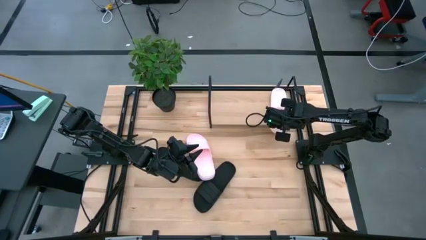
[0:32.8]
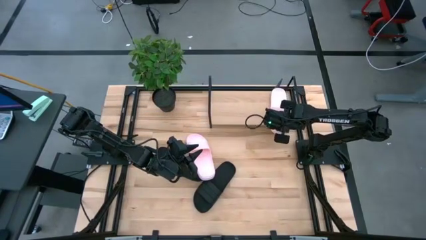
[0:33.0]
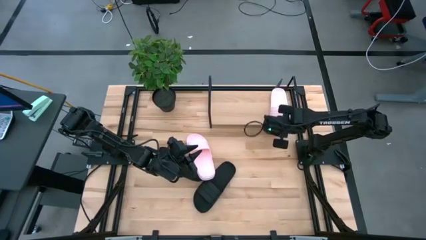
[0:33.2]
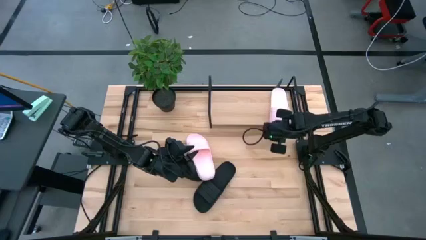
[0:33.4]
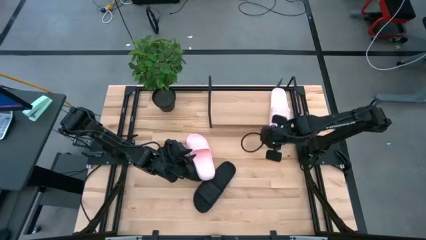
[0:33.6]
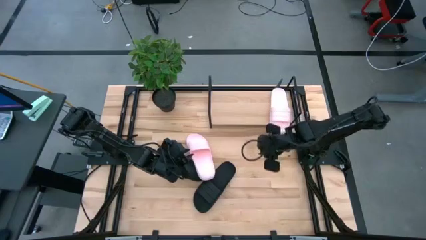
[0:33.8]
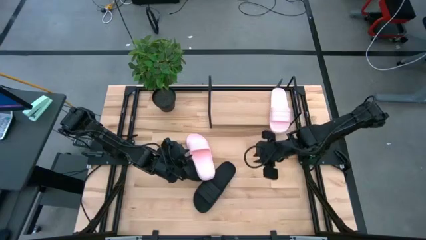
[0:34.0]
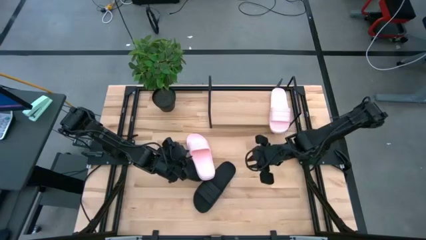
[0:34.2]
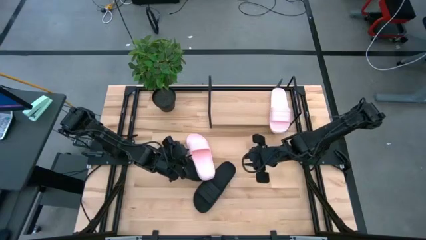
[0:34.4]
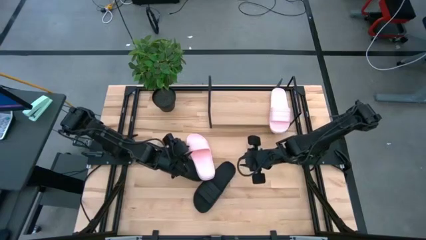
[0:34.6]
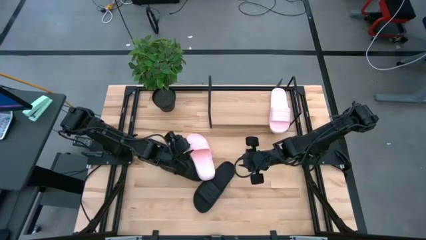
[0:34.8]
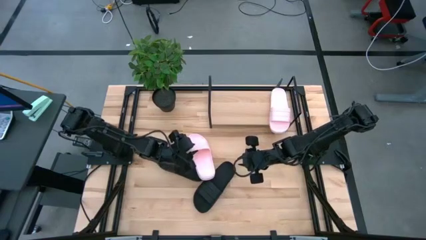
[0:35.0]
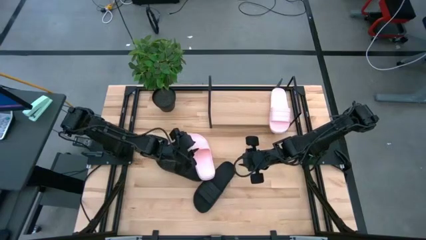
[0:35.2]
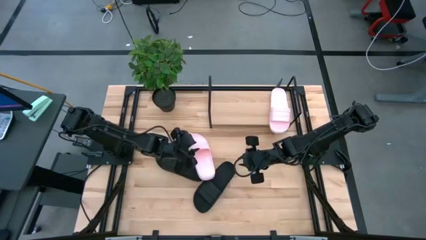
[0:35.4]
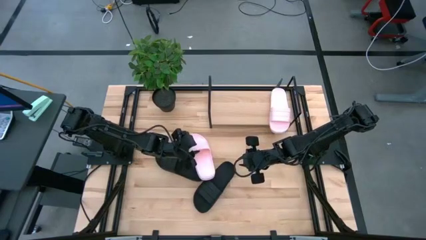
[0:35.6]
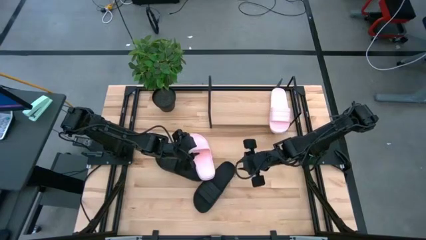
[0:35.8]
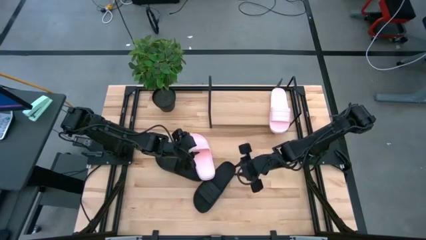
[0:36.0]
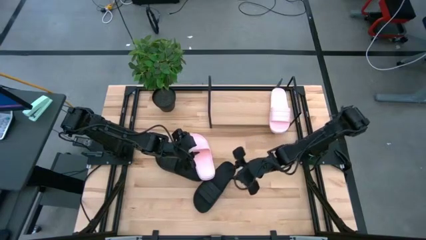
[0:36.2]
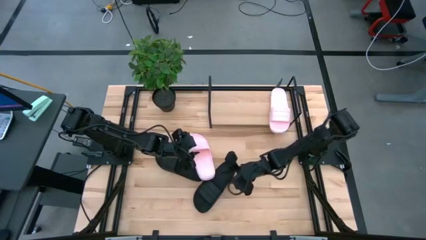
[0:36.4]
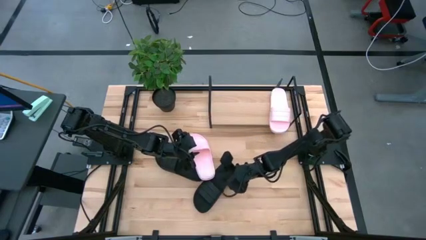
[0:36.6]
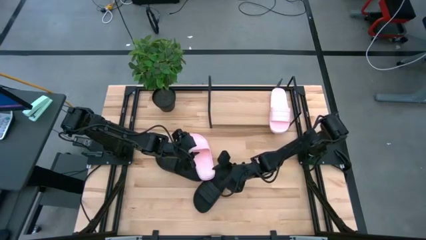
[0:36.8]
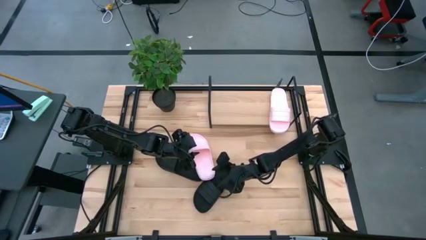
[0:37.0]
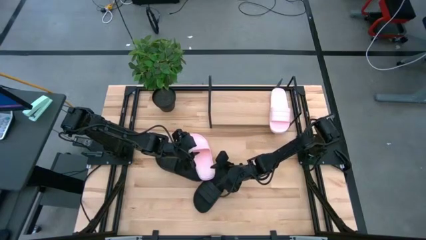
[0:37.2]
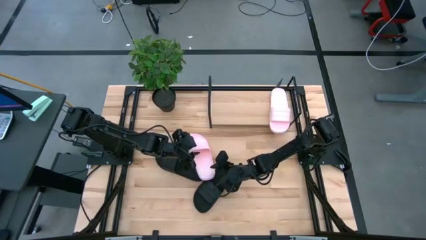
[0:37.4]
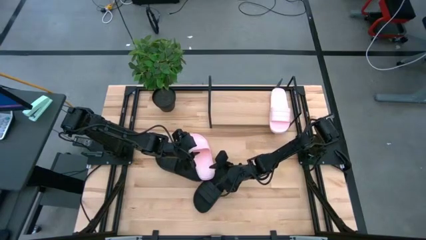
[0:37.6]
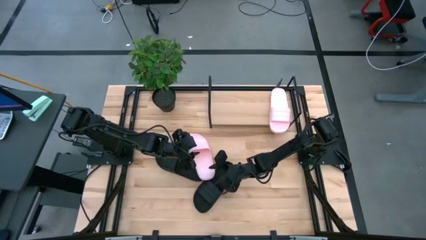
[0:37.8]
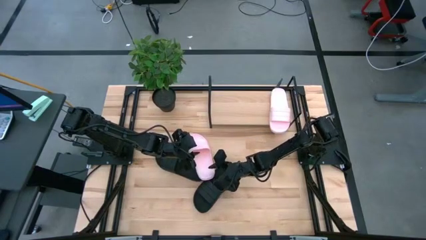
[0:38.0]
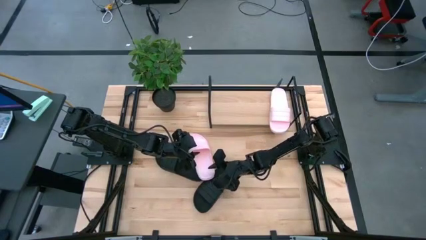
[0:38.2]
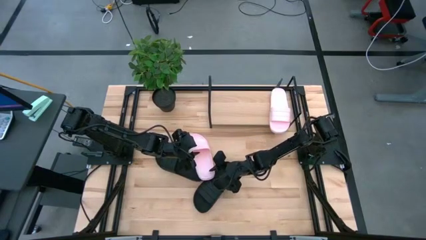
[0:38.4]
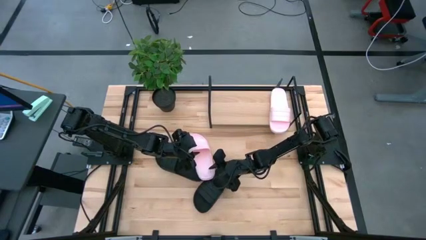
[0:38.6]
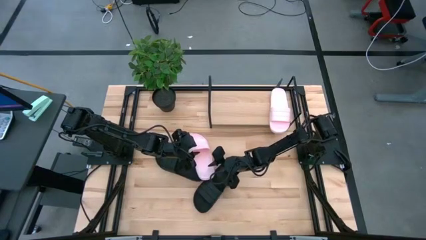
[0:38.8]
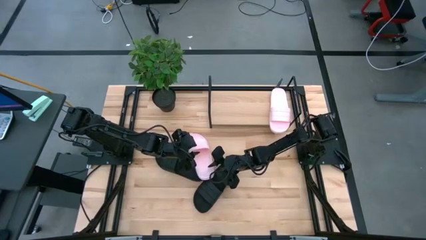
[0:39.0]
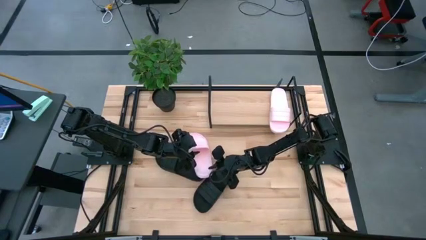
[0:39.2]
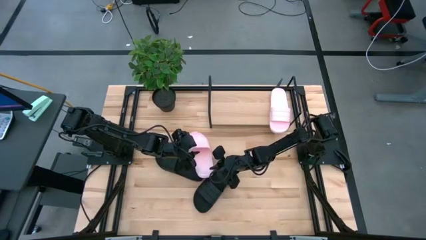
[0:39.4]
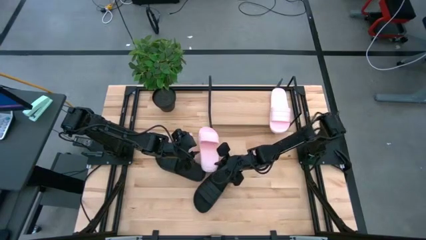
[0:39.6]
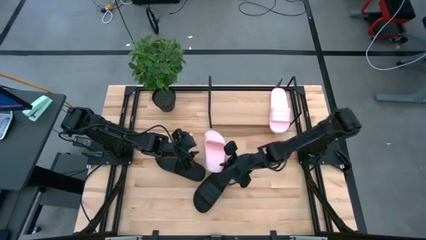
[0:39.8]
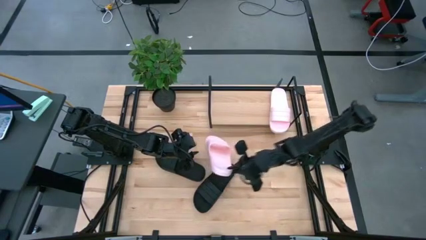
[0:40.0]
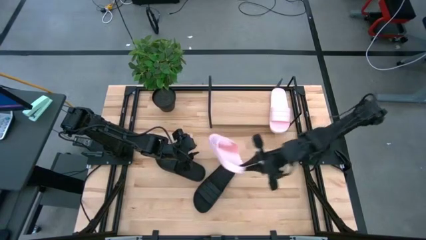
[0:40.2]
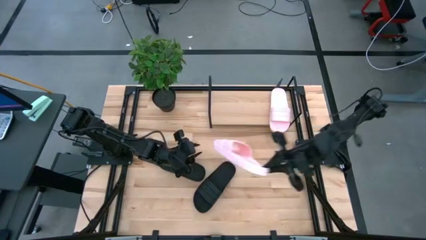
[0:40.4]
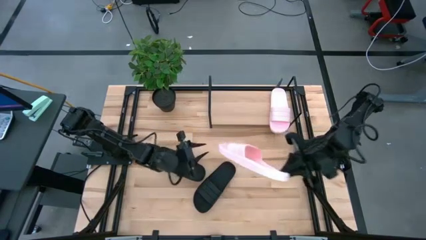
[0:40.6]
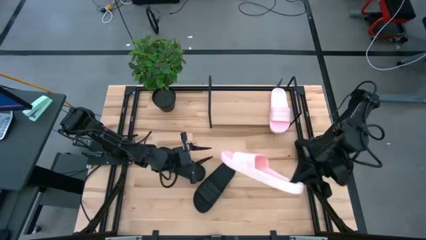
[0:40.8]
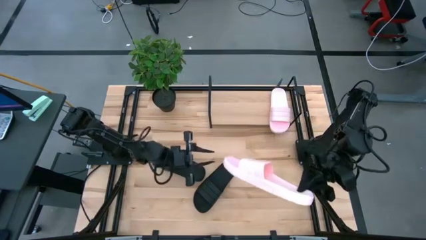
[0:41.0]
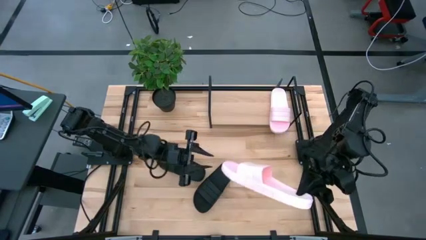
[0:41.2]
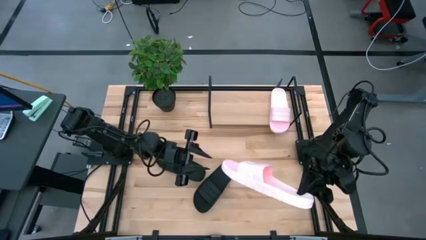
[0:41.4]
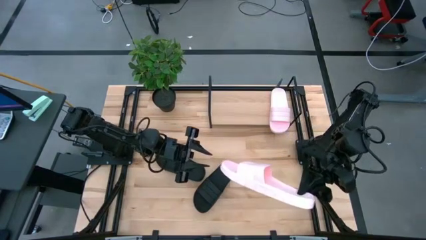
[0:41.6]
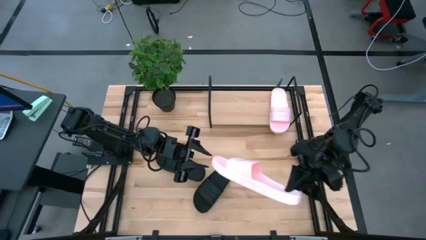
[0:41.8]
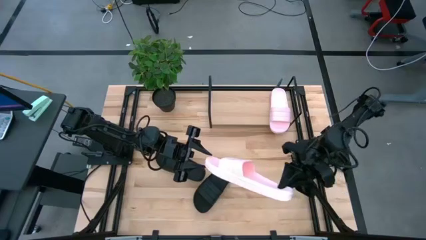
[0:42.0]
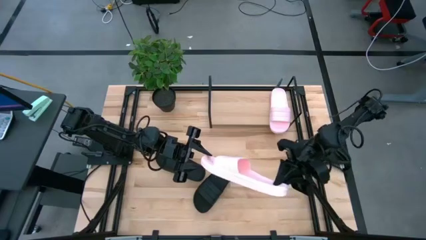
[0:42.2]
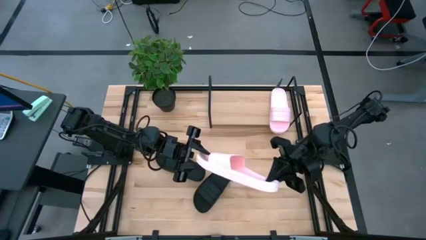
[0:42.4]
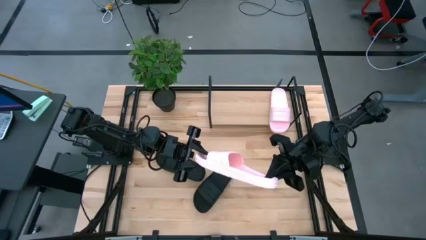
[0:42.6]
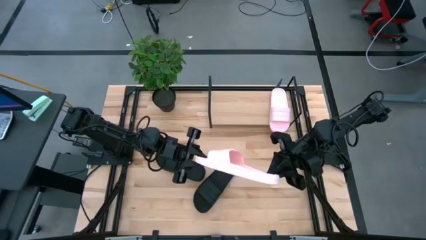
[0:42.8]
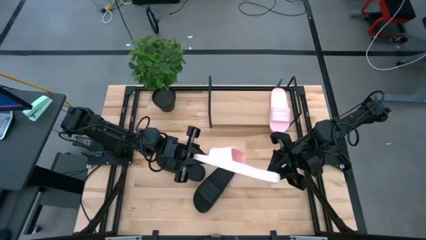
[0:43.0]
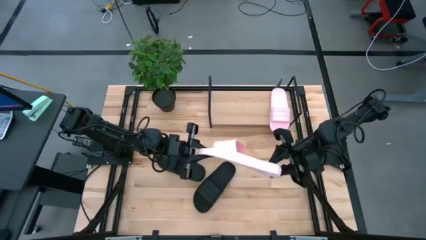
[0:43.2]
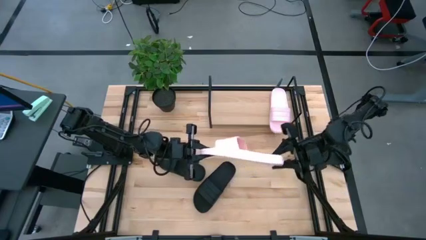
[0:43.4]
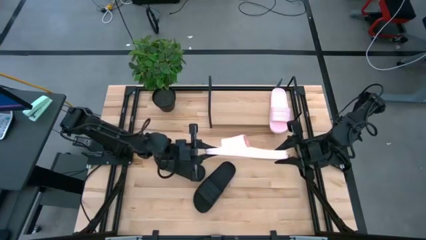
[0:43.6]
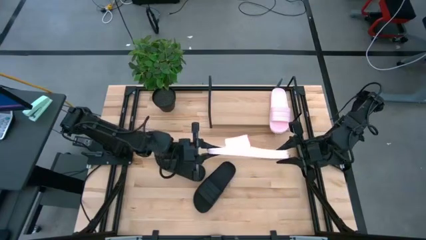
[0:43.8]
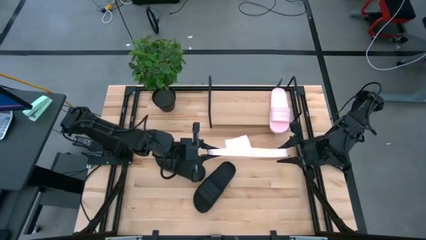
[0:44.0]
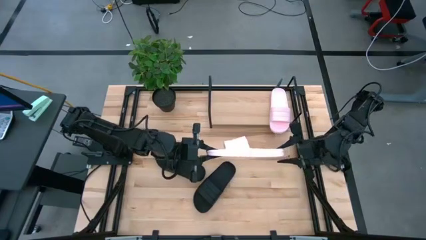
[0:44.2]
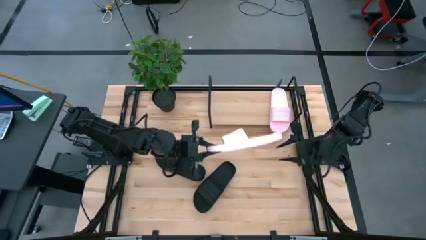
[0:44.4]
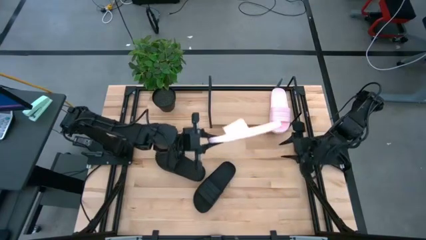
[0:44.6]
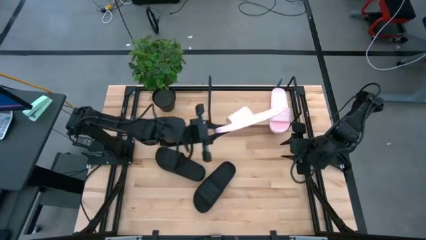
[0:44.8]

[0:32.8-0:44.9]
Task: Pick and place slides into the shelf
Put the pink slide on the shelf
